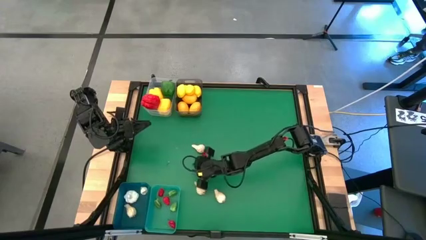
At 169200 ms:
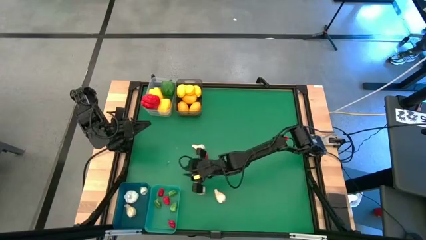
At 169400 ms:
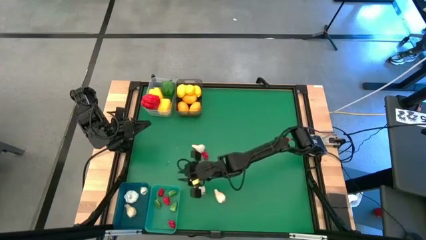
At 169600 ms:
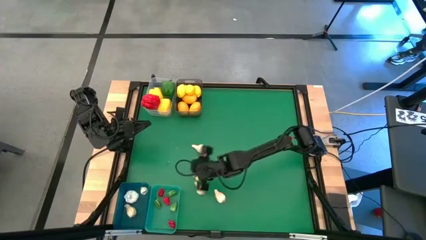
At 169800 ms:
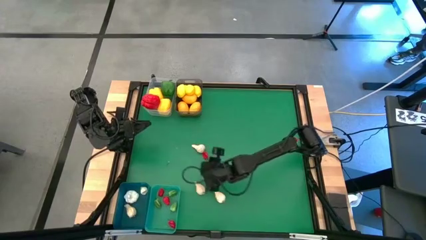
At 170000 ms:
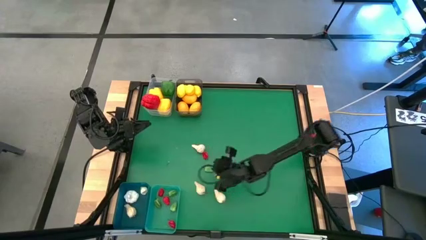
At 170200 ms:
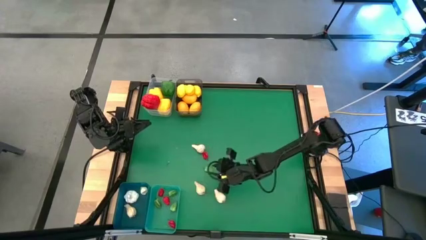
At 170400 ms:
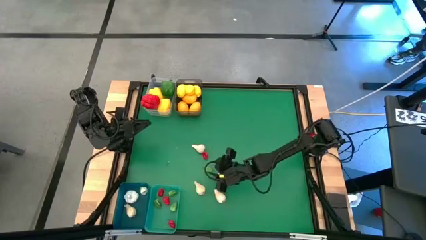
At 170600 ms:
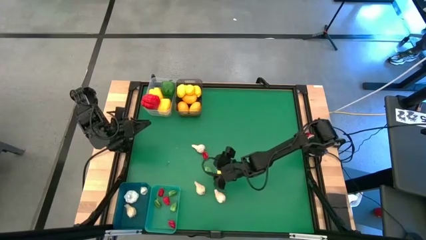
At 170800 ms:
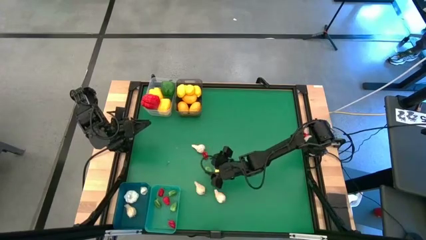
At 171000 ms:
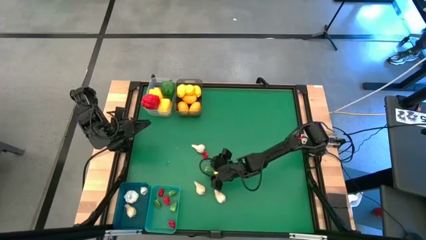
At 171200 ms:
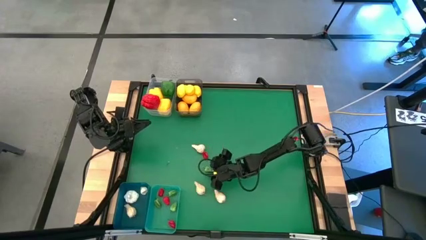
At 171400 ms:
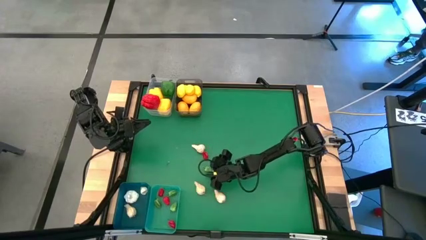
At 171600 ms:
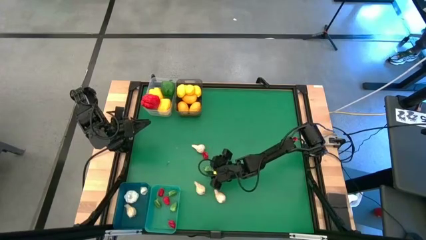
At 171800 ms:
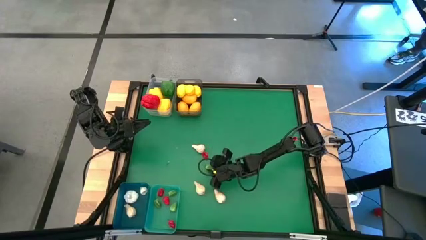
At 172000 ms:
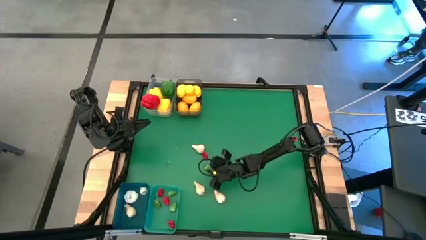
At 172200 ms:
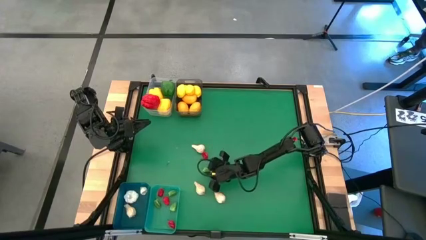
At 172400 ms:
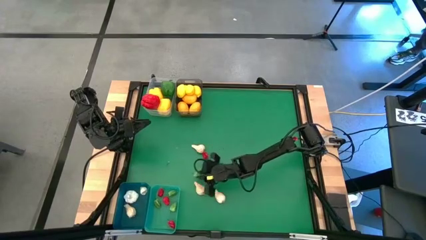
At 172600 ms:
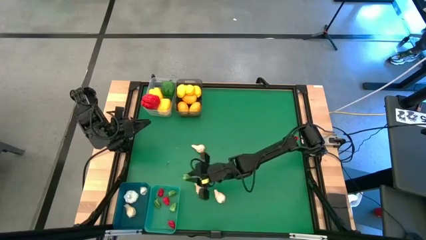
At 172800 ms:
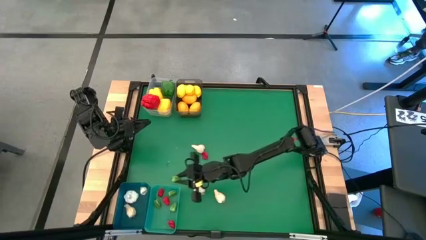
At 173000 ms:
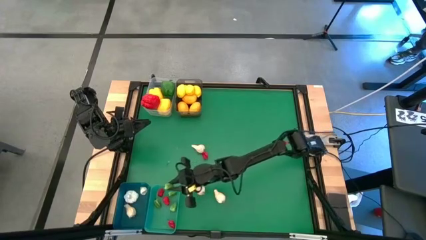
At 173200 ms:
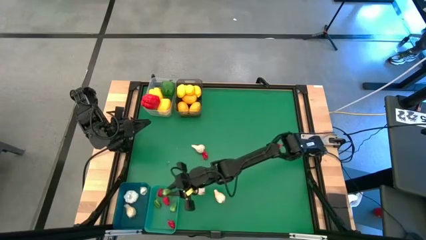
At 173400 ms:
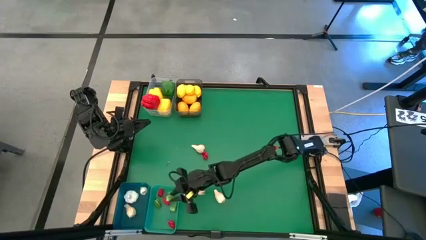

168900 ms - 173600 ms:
Task: Sort produce into baskets
Put the green chili pepper into the green bin

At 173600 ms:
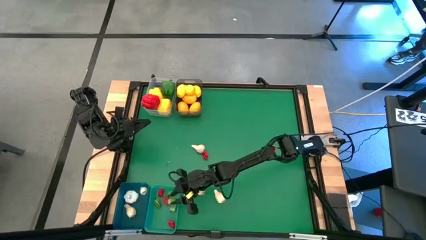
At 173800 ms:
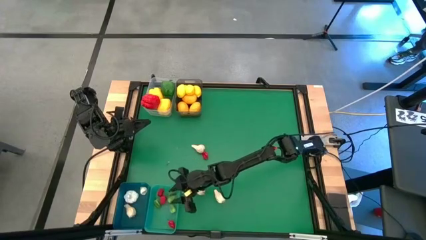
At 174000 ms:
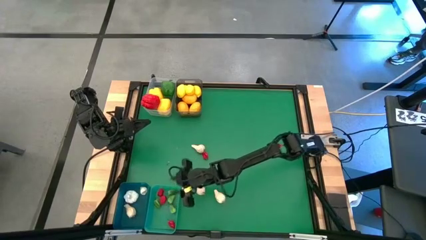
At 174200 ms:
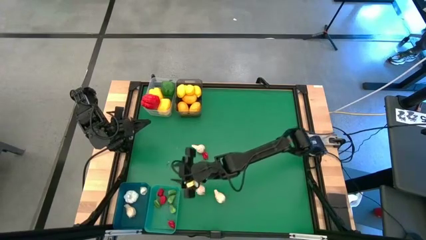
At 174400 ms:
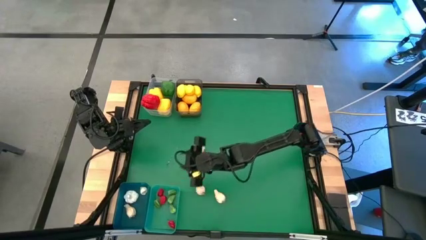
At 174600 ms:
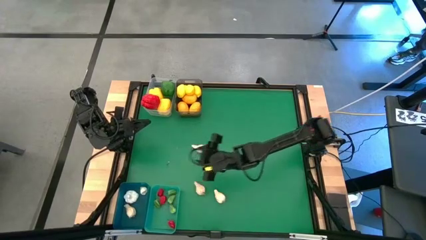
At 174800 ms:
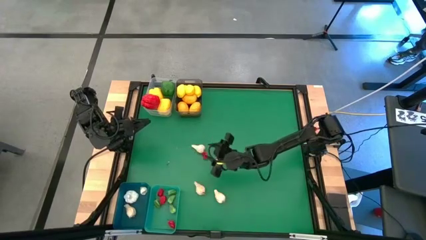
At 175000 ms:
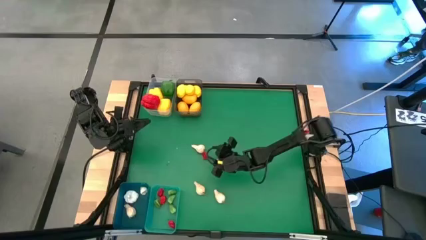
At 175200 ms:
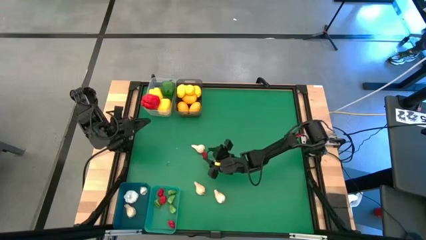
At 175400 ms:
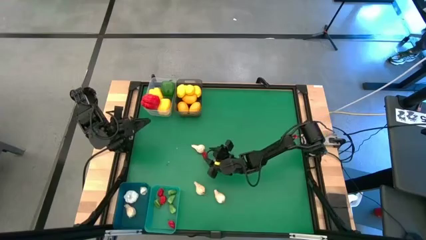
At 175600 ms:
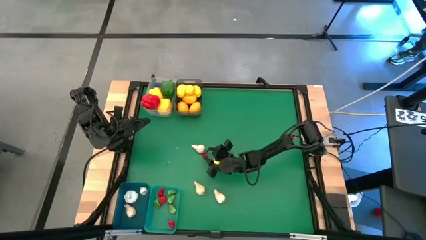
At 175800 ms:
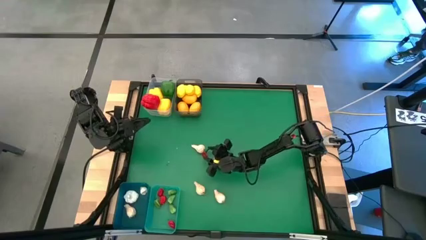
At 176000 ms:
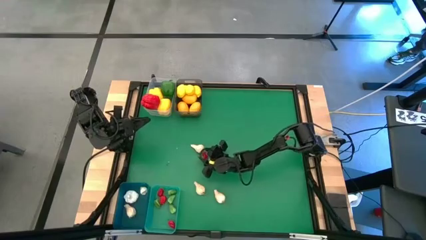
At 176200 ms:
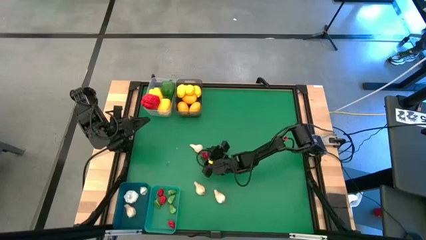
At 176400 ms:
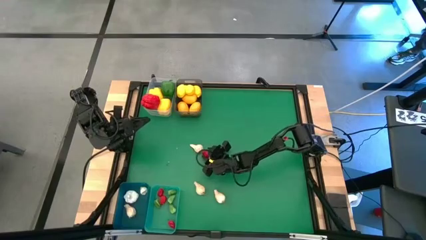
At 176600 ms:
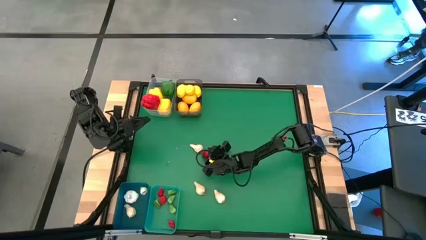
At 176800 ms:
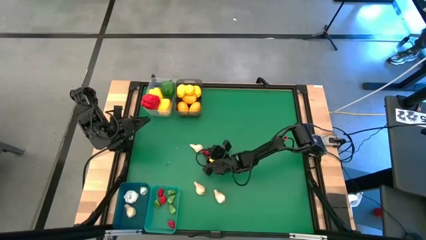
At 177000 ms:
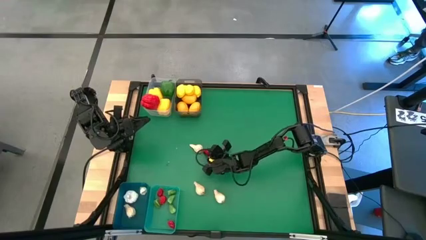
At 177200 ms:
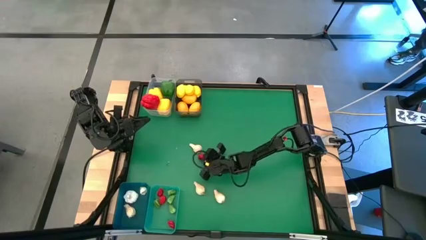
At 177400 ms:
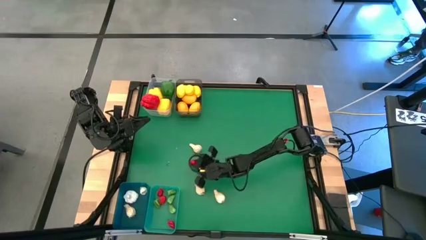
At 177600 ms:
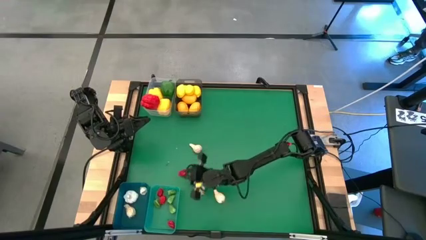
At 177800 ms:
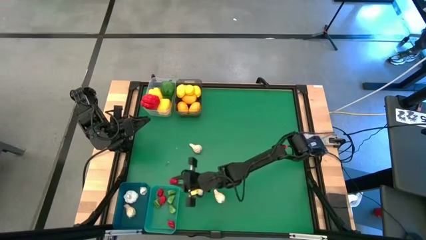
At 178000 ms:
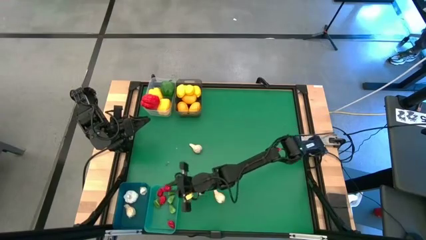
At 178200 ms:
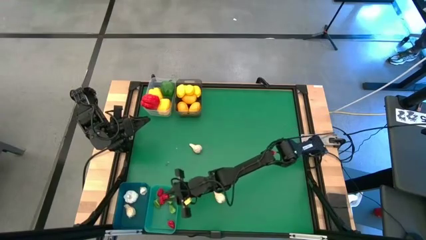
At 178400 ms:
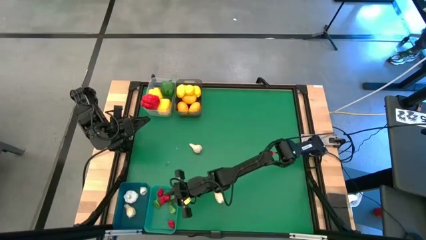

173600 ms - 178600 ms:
Put the red chili pepper into the green bin

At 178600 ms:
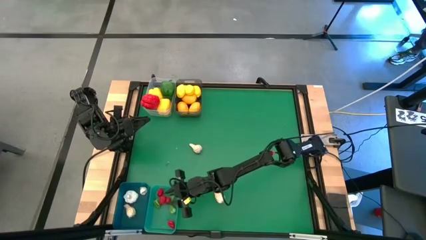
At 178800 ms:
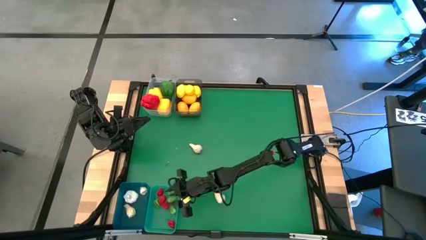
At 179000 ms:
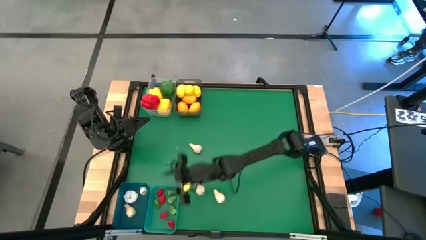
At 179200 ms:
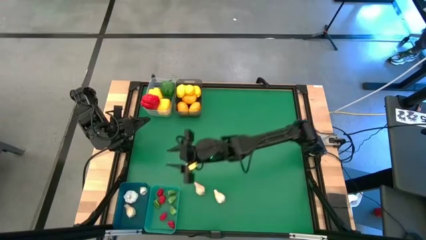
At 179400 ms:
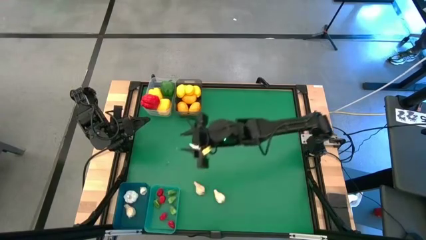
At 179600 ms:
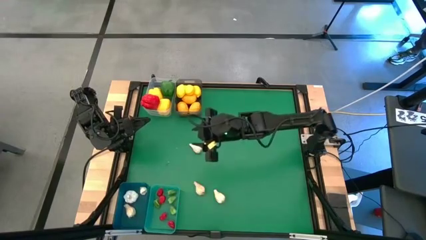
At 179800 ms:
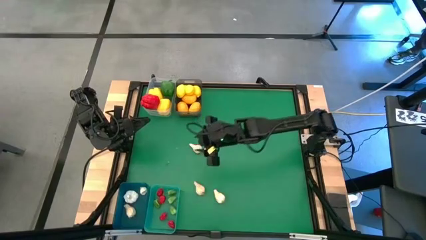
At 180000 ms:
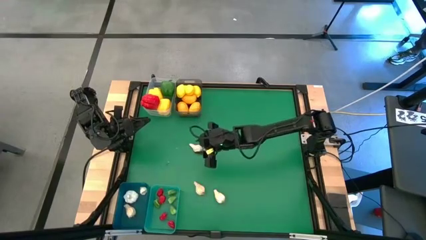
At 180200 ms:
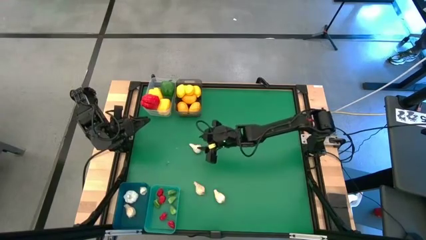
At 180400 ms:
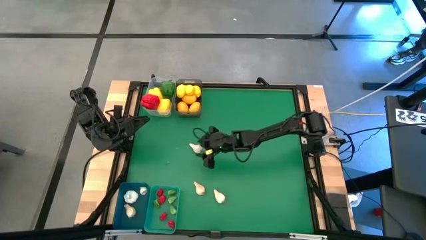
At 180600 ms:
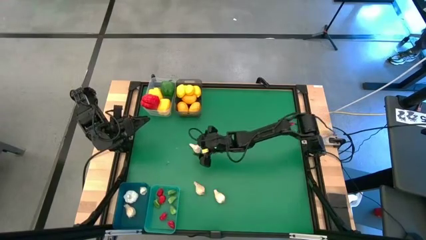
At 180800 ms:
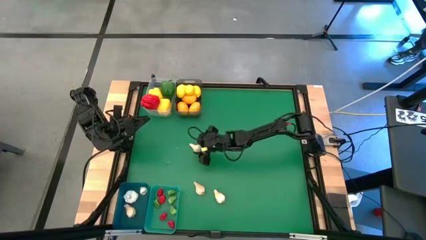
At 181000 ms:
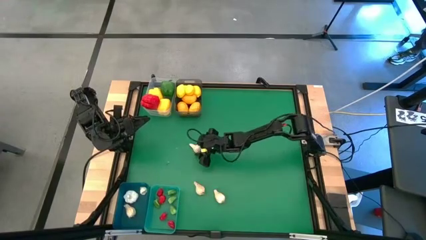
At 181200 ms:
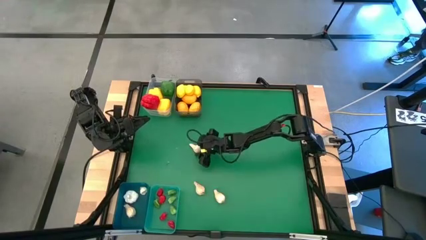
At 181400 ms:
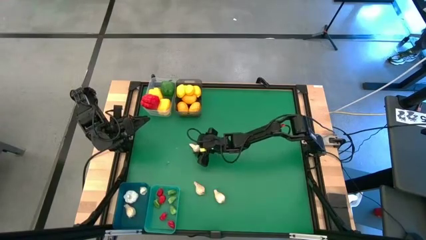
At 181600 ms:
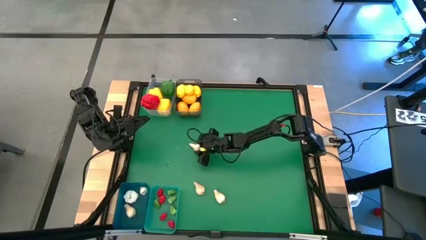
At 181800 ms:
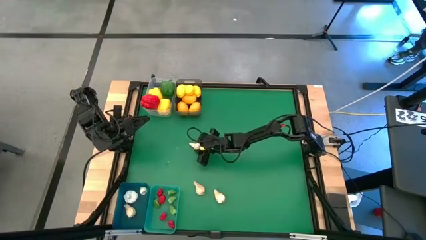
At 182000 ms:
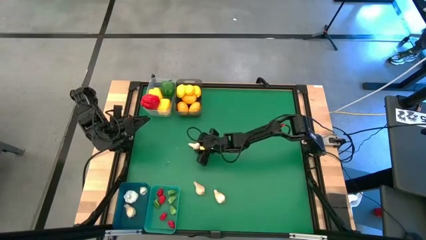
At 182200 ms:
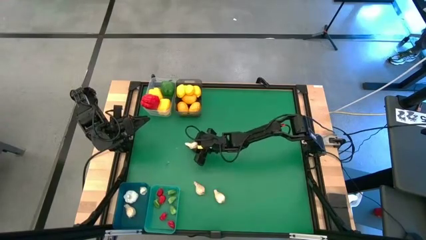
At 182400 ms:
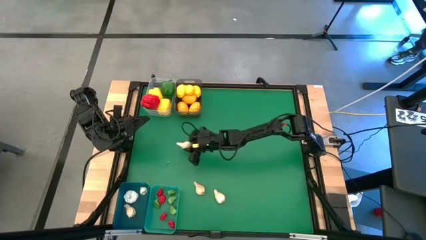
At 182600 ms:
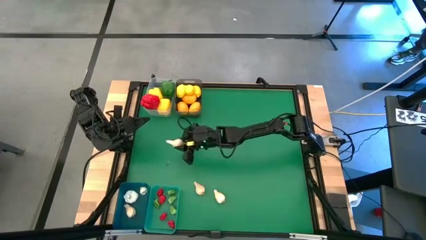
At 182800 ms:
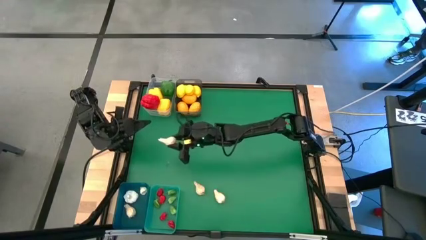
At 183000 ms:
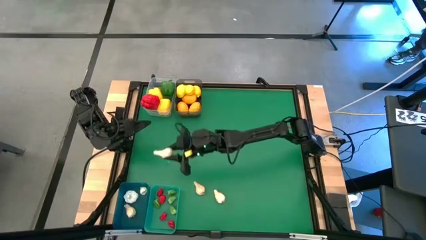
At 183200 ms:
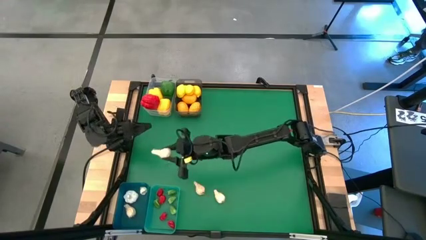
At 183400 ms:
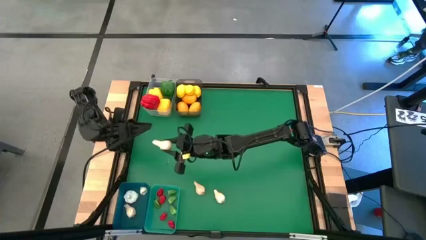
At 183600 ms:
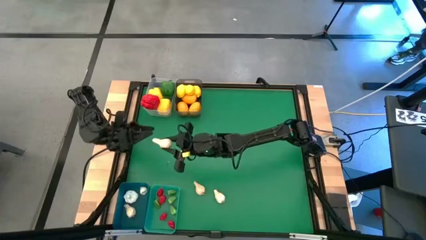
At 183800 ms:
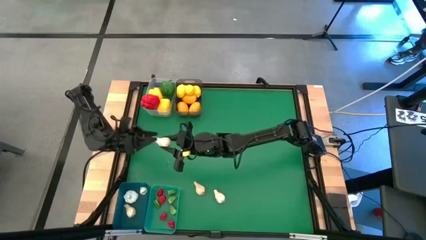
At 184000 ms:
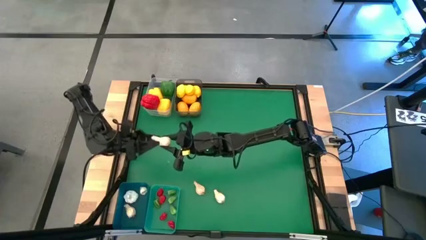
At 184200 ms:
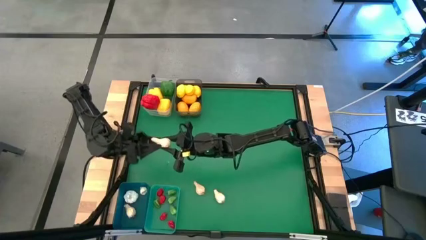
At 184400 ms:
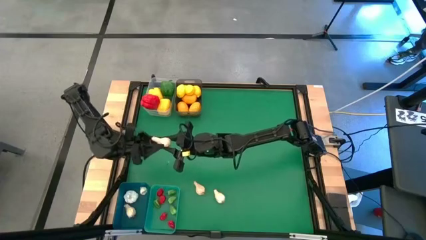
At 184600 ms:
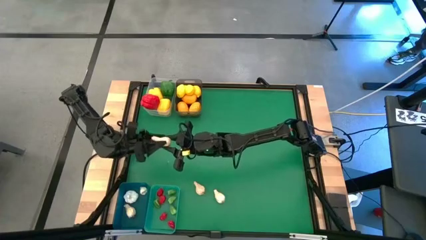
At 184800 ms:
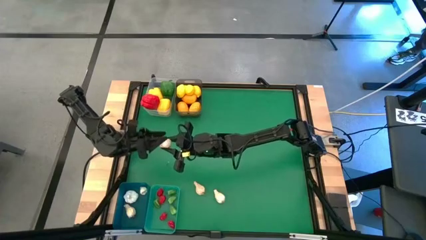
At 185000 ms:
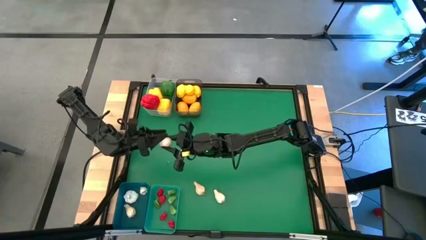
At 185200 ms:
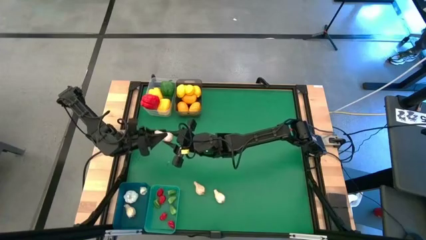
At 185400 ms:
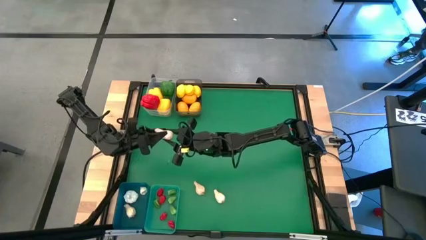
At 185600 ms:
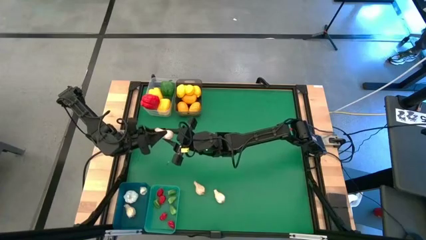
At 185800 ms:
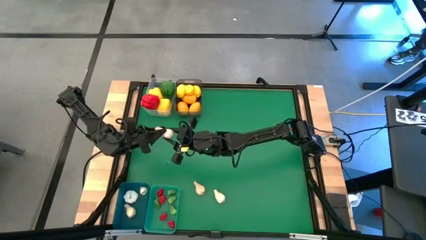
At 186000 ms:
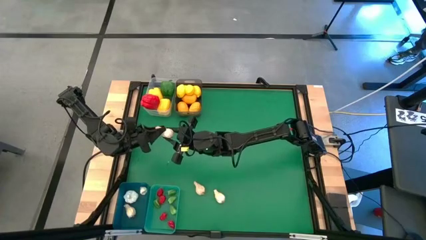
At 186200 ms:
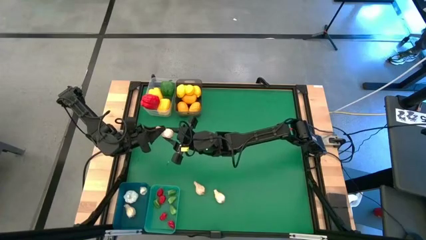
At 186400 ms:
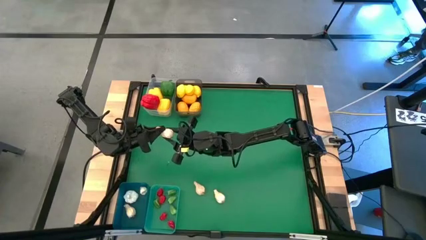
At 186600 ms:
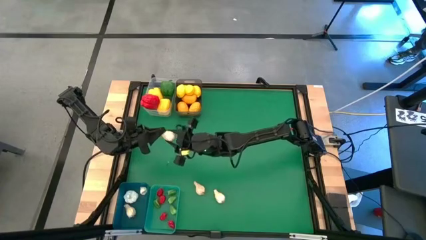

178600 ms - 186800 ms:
Put the white garlic into the blue bin
